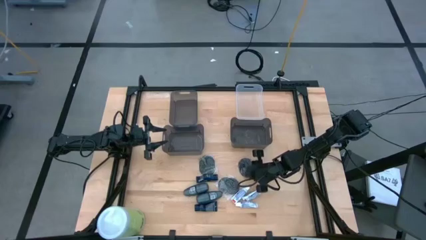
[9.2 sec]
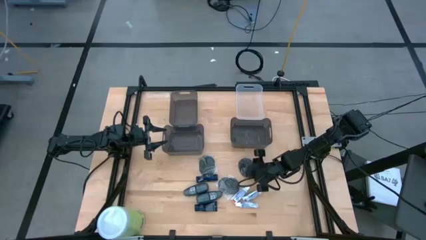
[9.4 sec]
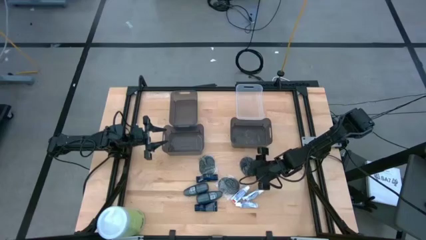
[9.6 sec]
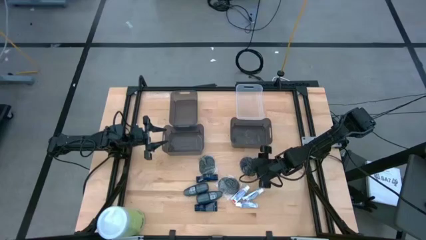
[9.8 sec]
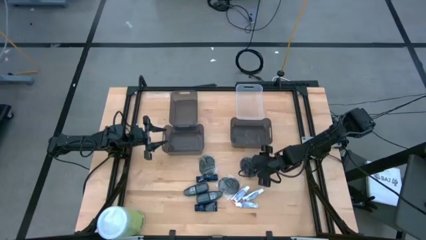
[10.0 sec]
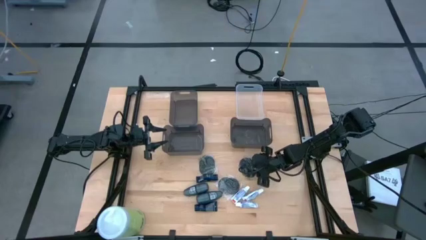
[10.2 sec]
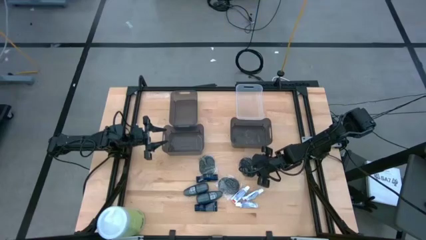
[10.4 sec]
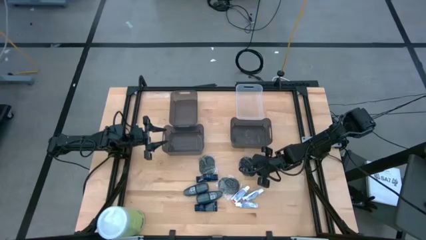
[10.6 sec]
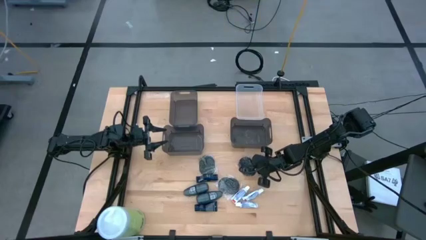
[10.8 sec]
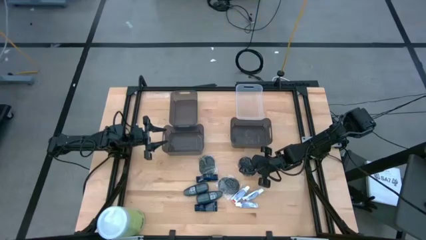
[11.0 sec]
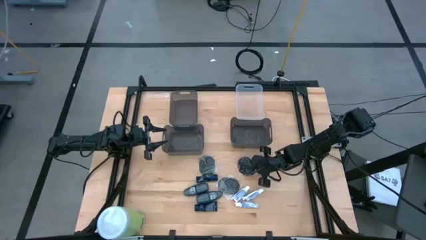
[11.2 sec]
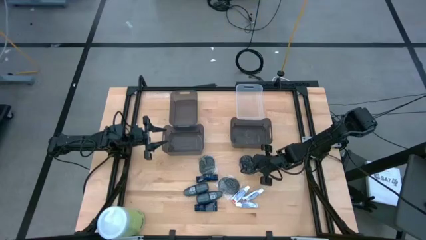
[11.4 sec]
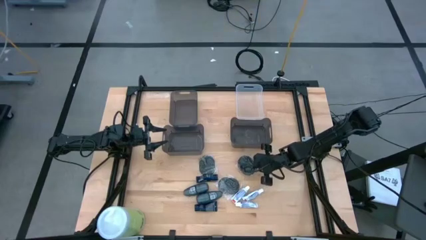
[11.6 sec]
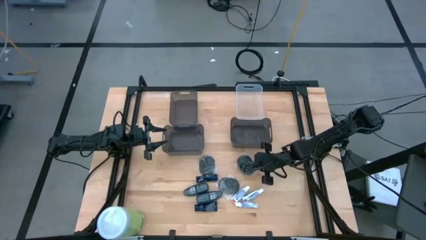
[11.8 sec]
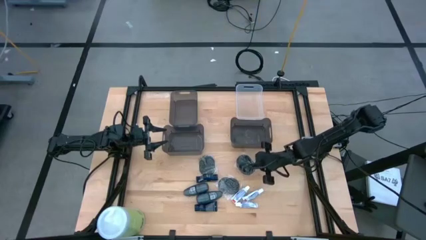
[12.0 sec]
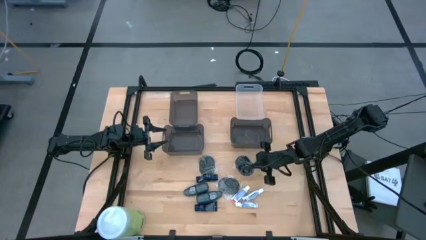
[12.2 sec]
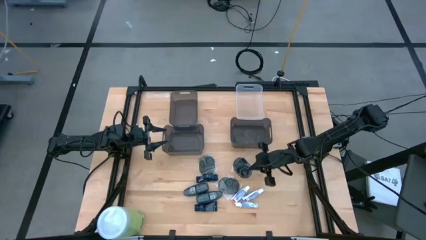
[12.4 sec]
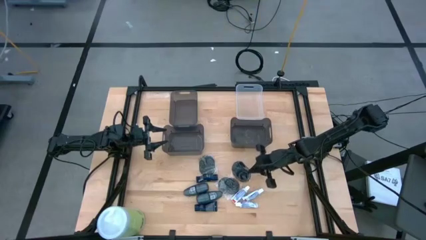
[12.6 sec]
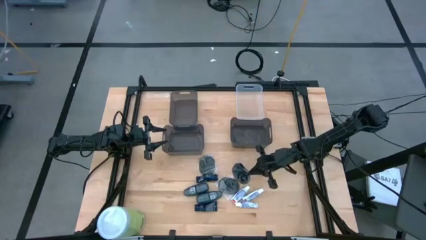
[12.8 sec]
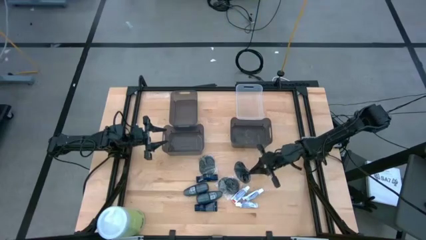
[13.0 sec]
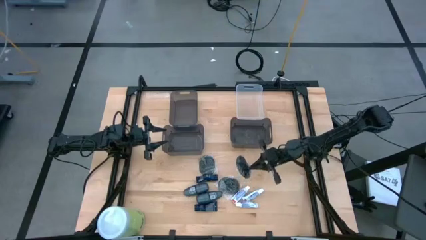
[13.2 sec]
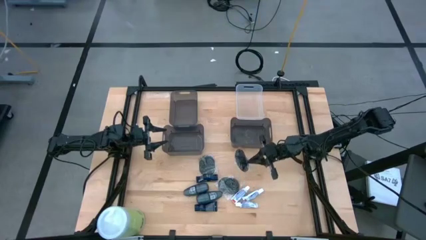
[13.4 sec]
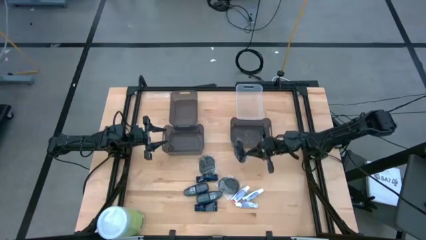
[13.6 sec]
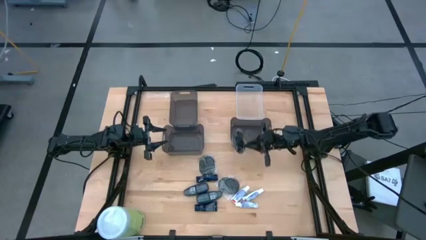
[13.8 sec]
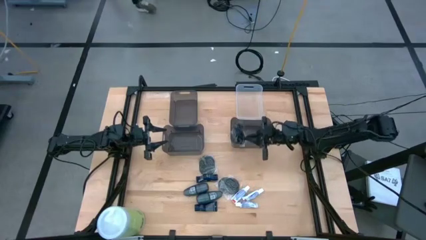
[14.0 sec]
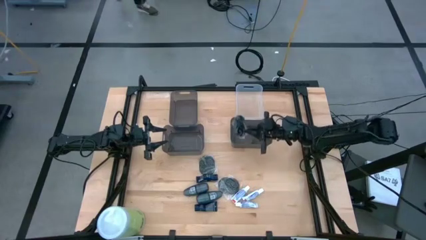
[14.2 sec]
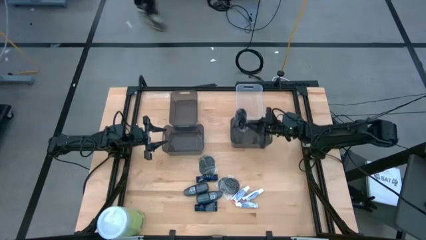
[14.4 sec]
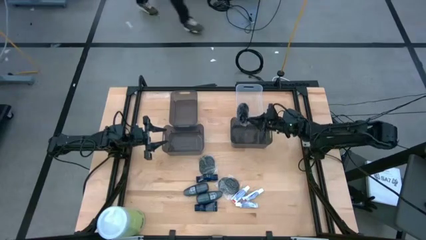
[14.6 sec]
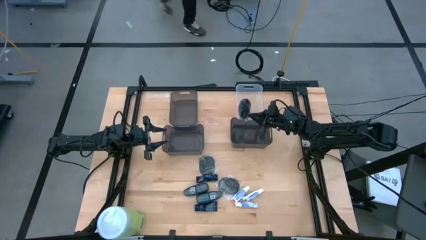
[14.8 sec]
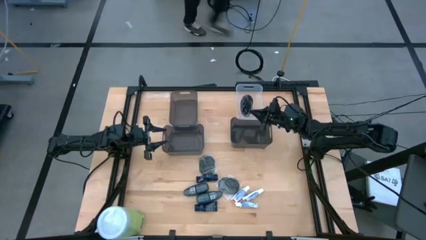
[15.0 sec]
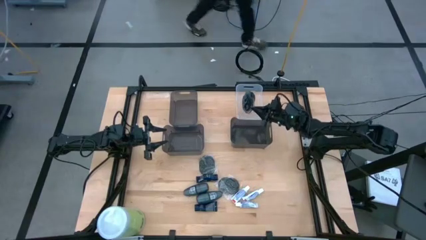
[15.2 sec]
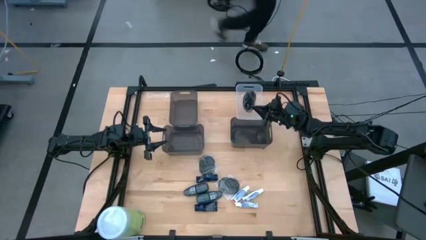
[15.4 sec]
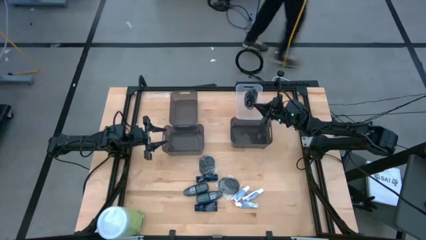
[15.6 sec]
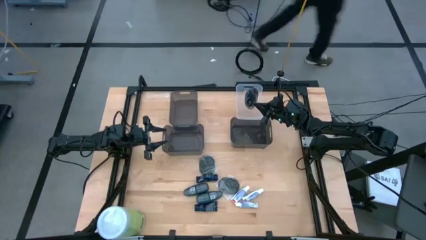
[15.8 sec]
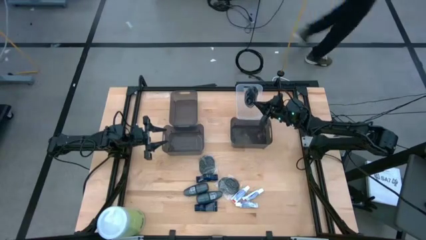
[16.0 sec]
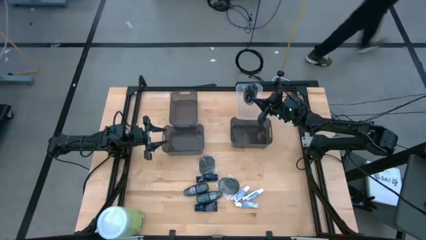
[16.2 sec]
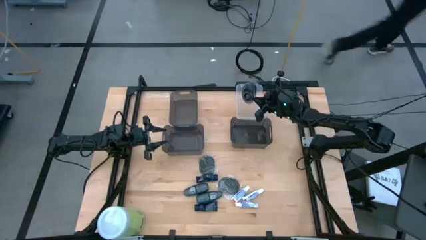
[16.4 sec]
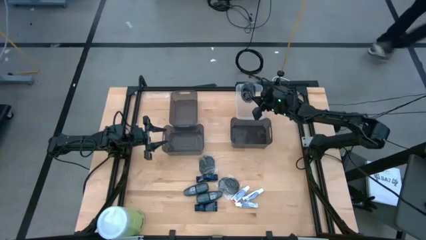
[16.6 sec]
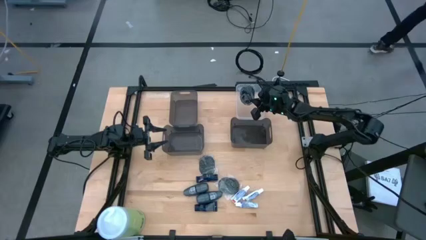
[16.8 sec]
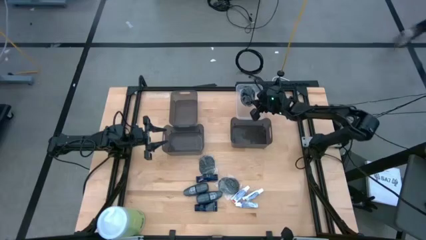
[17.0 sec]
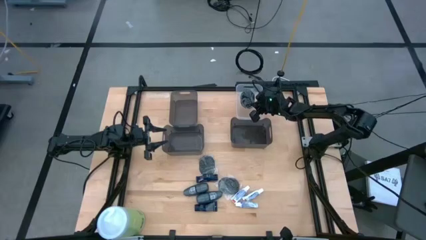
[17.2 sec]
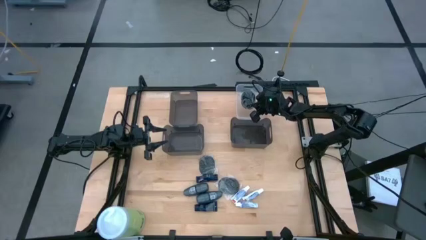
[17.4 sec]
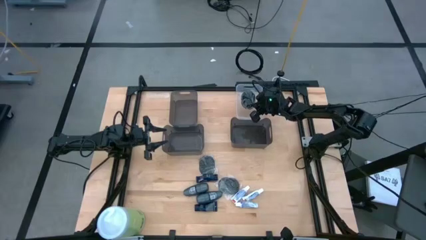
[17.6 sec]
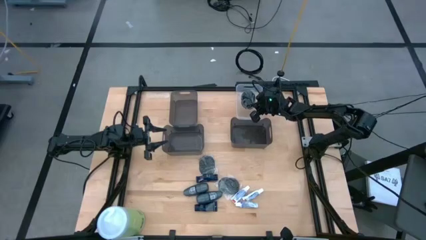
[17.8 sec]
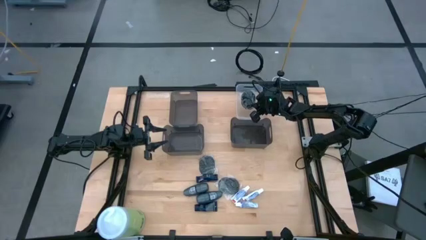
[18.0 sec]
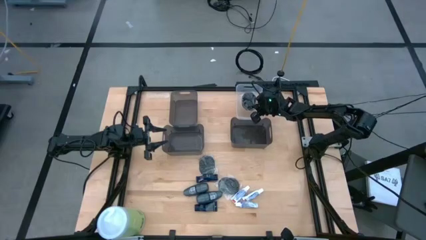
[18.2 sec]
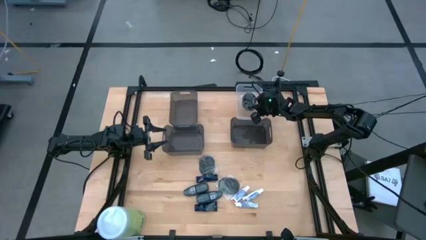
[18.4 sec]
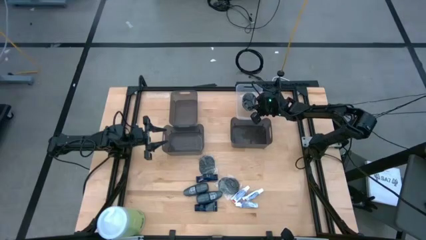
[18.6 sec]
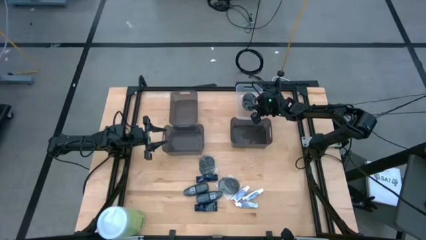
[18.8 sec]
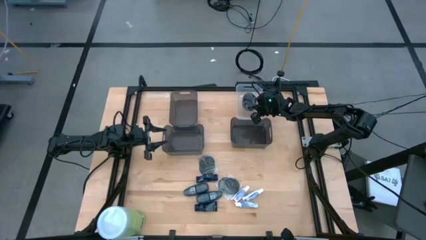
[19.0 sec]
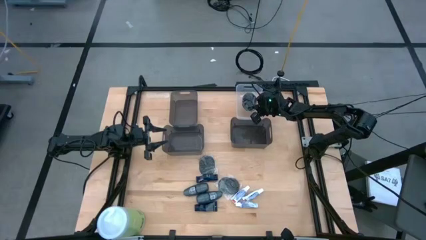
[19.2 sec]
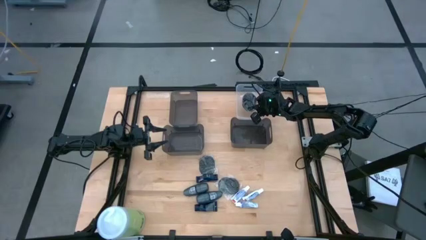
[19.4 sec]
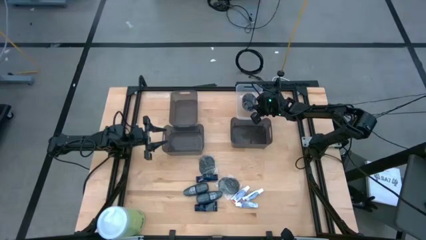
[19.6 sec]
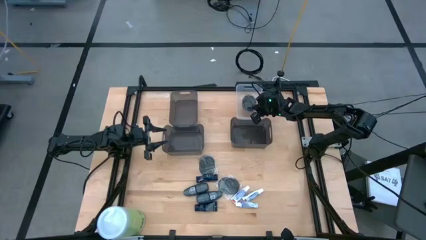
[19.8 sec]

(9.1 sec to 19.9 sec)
Task: Pick & Place Travel size toiletries
Put the top right black hairbrush into the transparent bin
